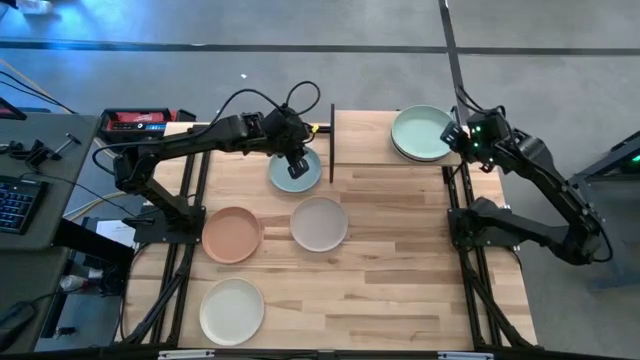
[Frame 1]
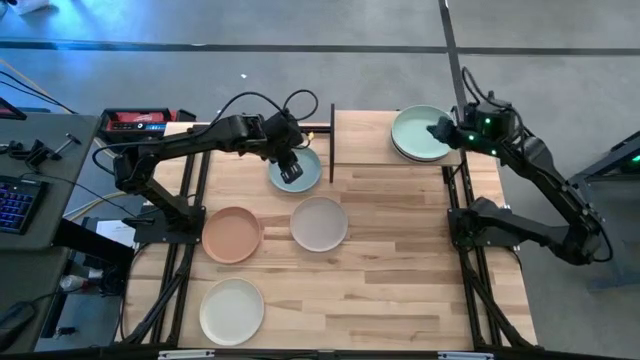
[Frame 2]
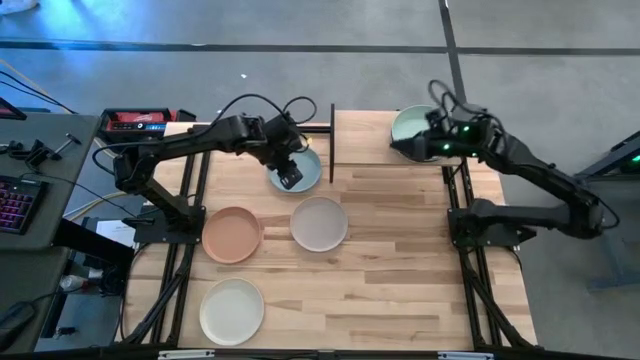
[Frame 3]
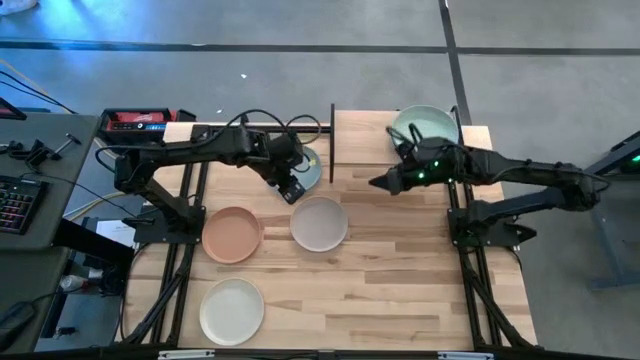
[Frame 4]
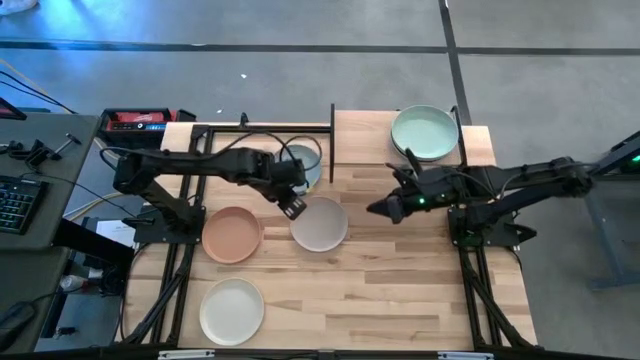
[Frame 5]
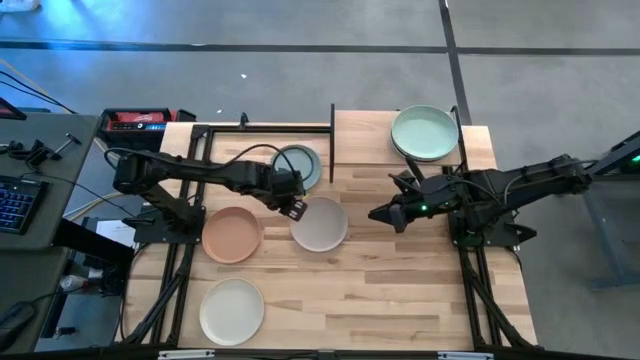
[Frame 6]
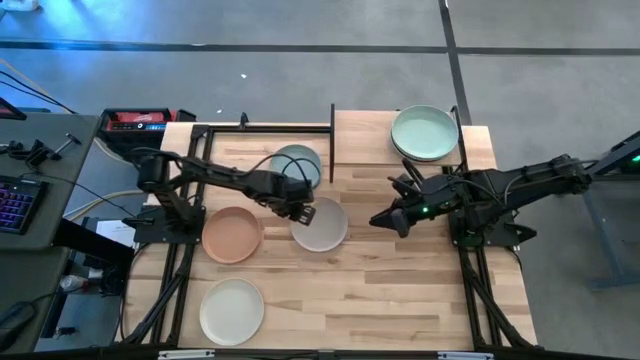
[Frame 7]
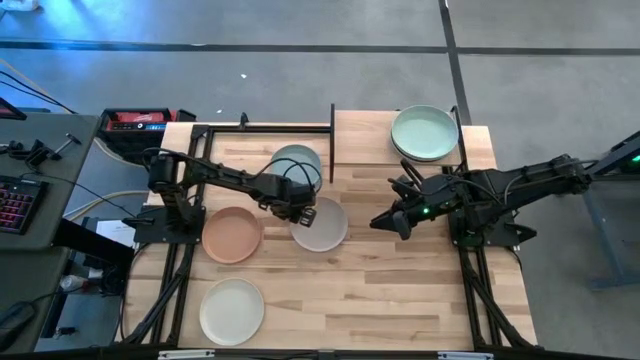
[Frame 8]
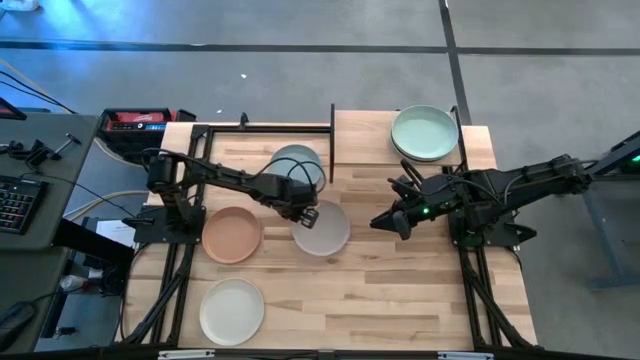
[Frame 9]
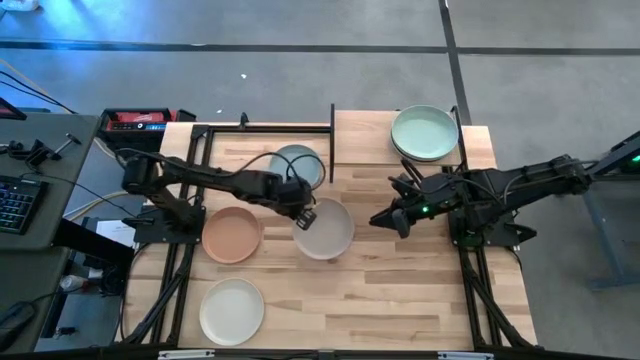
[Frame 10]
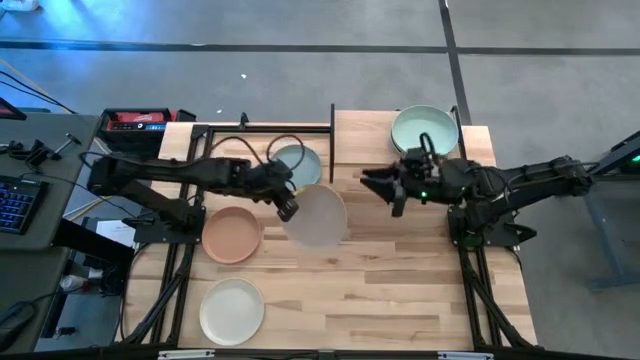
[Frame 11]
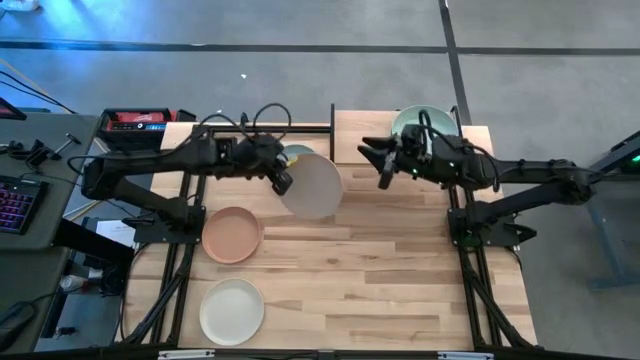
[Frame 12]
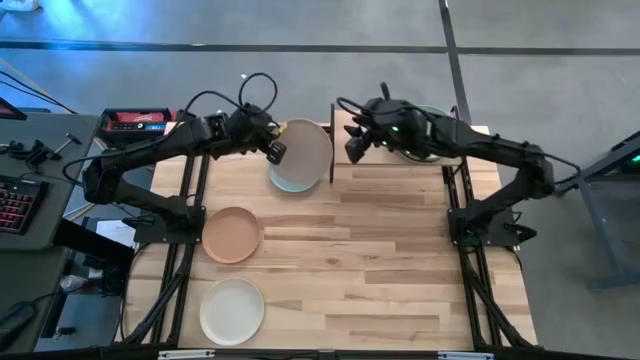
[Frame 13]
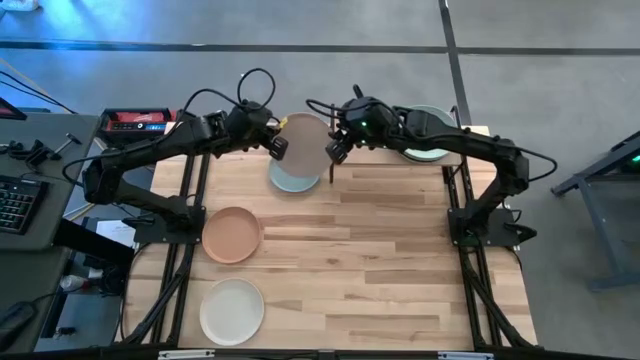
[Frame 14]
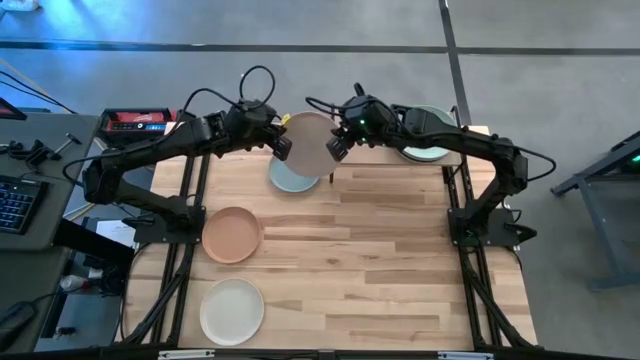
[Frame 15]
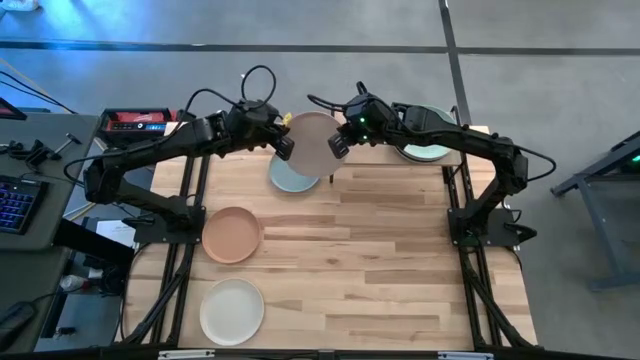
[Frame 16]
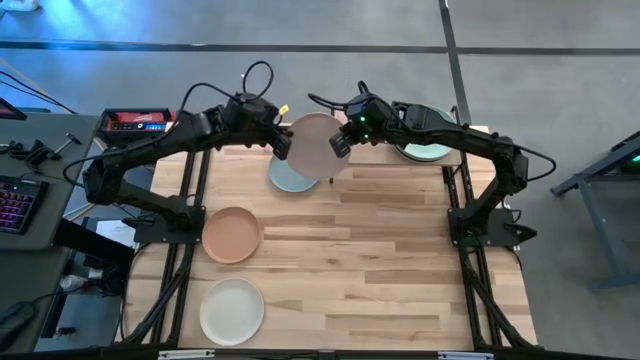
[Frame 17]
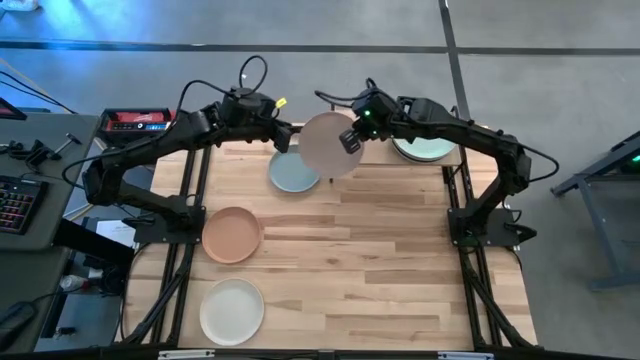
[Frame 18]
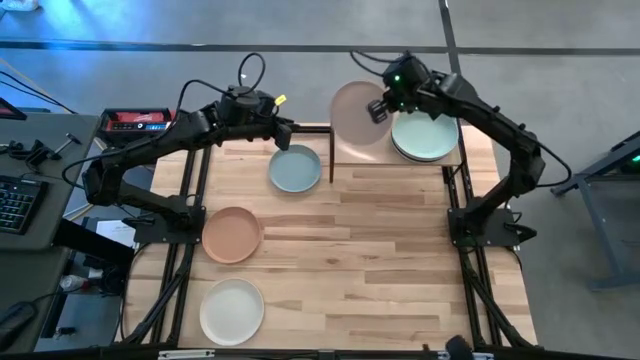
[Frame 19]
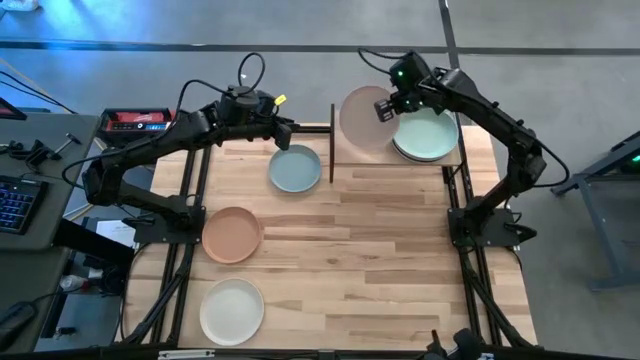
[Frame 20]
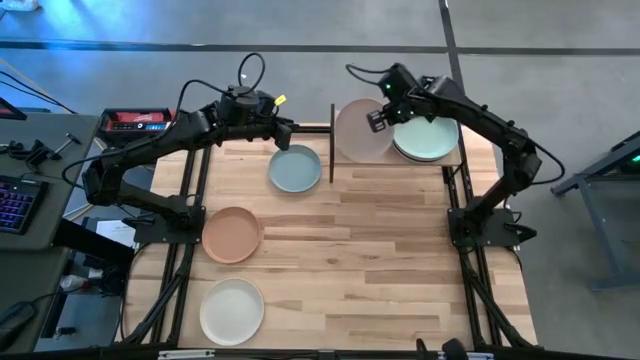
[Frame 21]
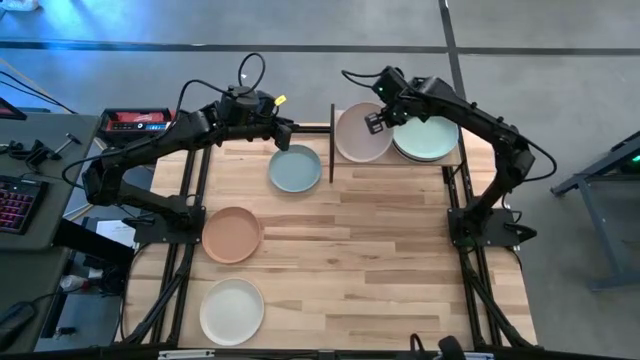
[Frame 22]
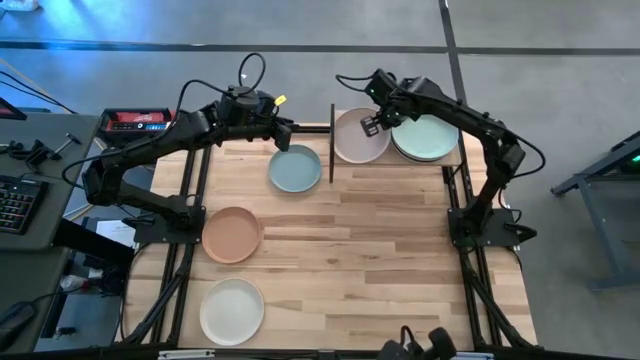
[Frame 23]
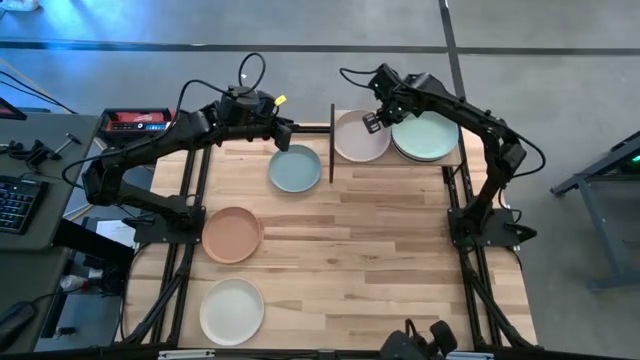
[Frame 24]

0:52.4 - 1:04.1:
Task: Place and stack plates onto a shelf
Put the top white plate on the shelf

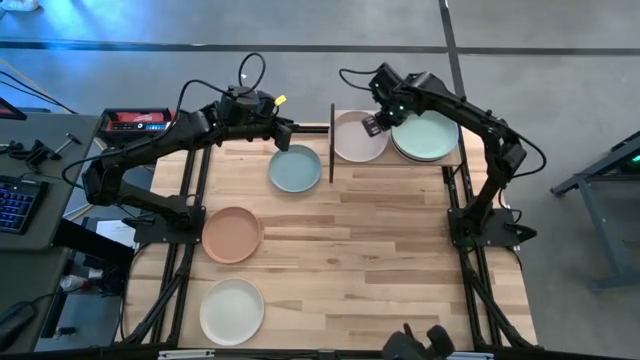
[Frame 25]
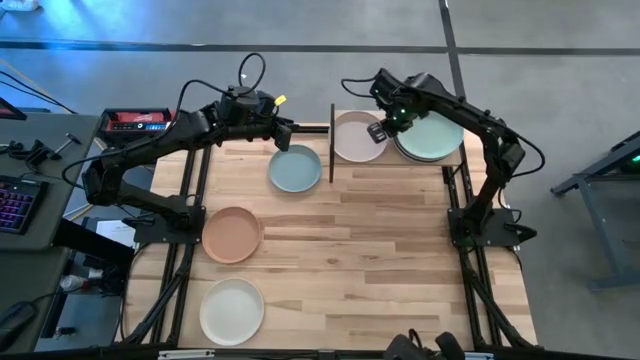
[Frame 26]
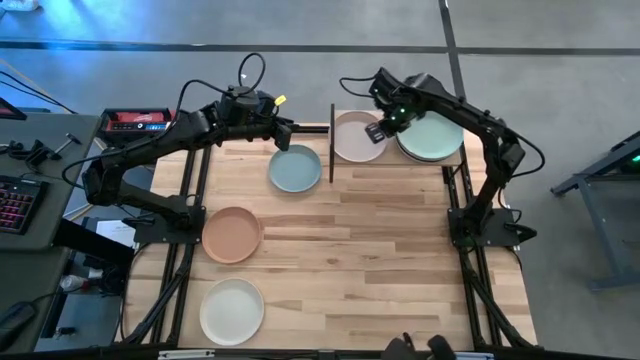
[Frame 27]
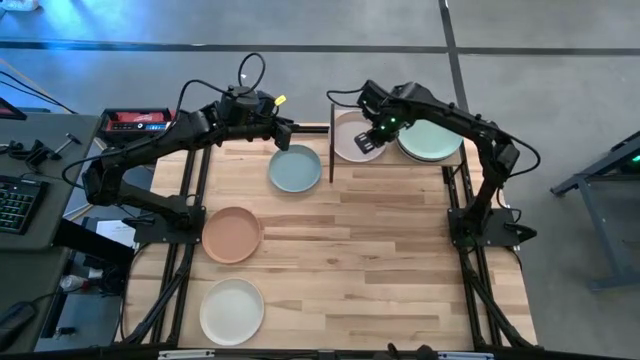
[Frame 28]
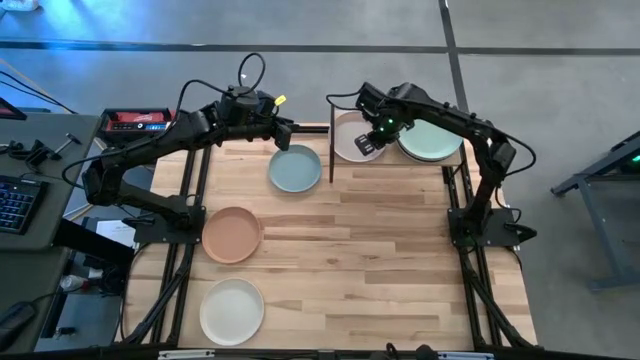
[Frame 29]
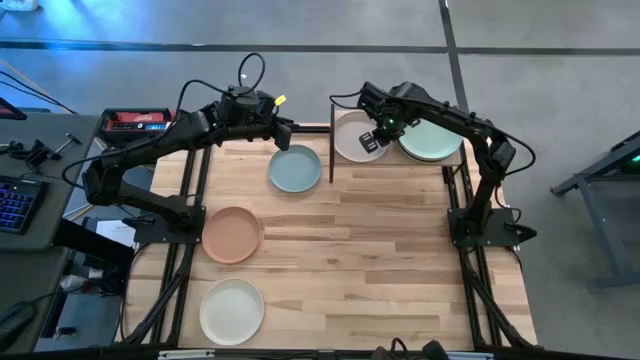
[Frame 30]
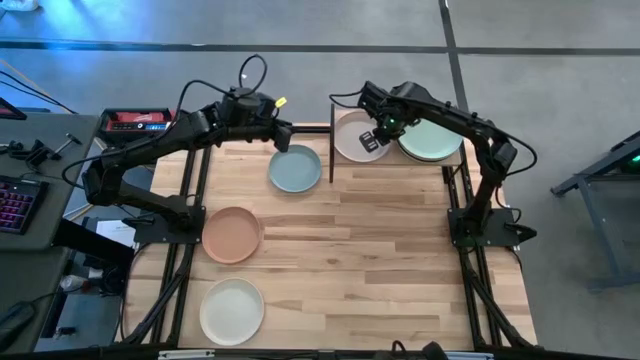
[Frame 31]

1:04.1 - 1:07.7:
Adjust the plates on the shelf
